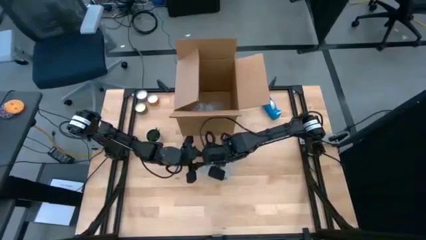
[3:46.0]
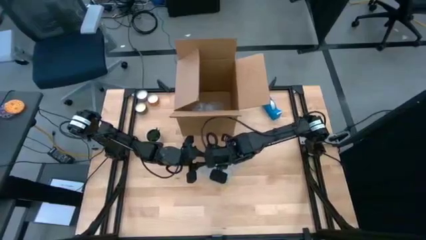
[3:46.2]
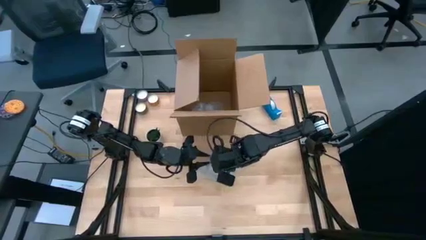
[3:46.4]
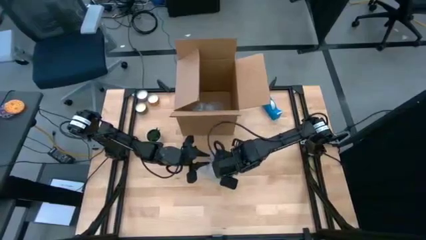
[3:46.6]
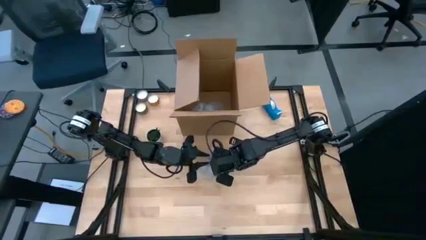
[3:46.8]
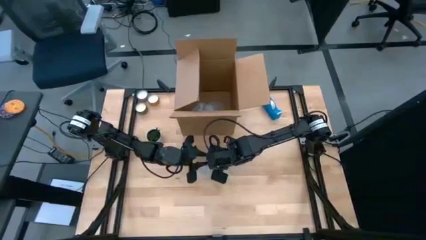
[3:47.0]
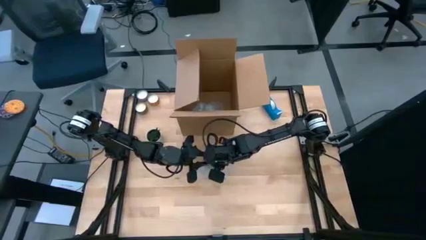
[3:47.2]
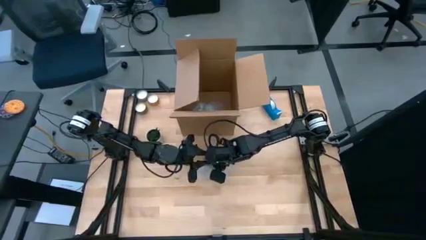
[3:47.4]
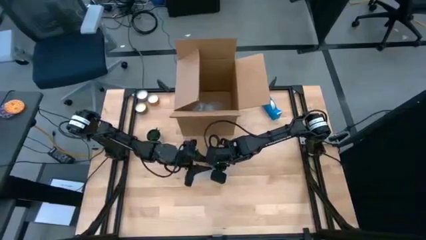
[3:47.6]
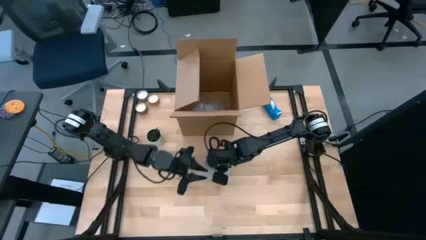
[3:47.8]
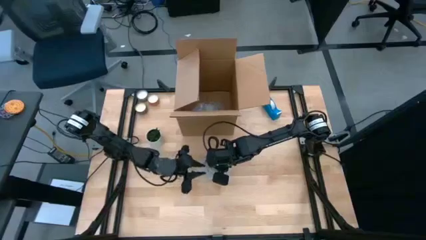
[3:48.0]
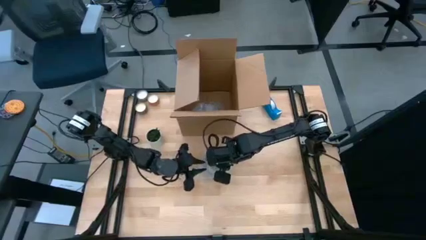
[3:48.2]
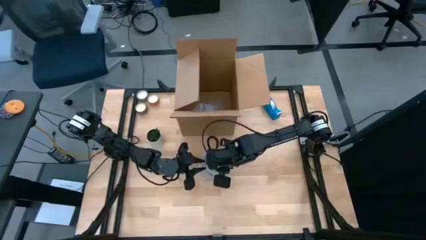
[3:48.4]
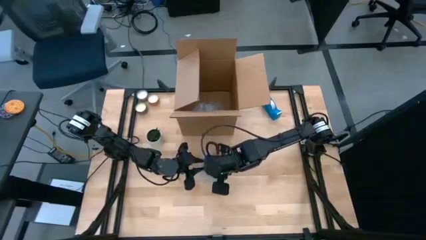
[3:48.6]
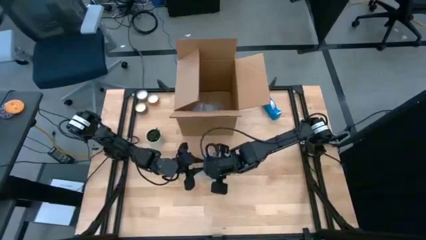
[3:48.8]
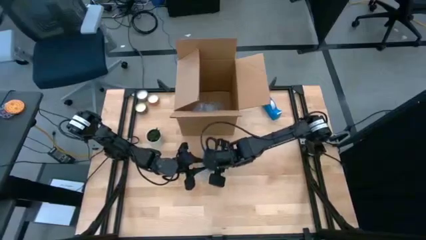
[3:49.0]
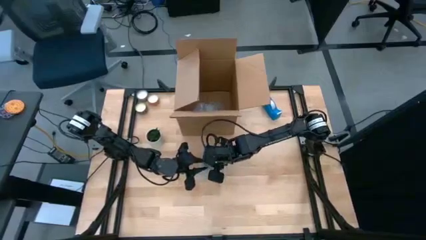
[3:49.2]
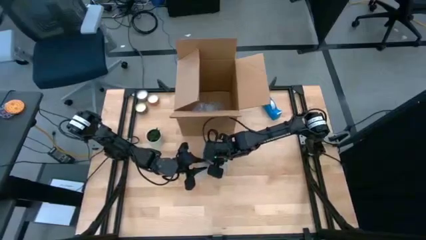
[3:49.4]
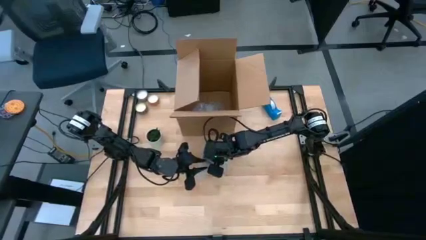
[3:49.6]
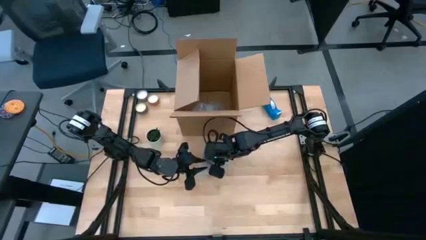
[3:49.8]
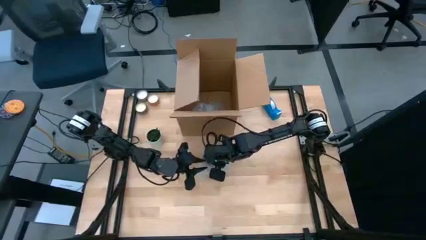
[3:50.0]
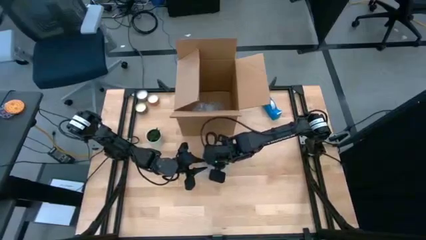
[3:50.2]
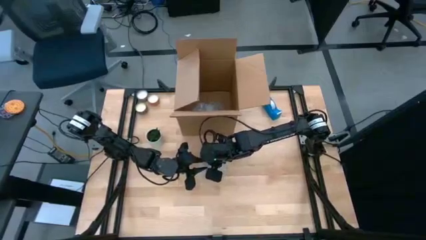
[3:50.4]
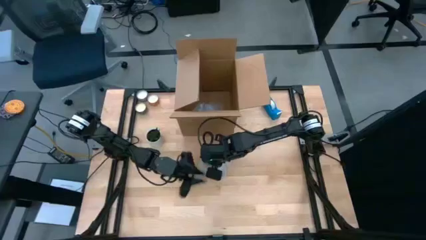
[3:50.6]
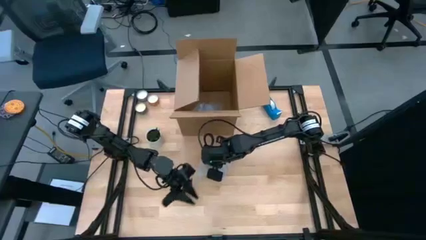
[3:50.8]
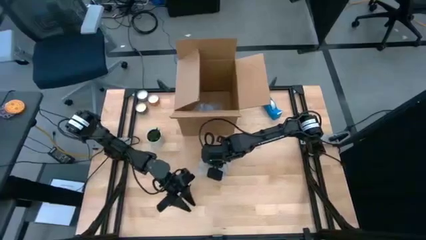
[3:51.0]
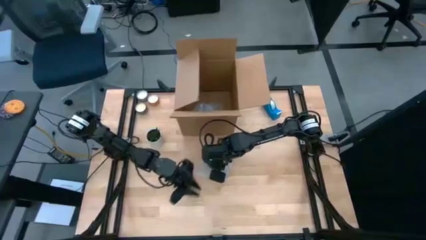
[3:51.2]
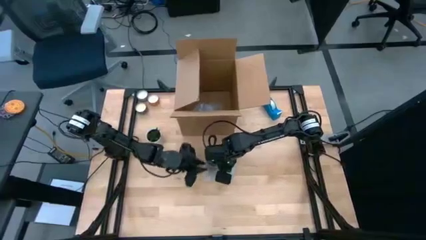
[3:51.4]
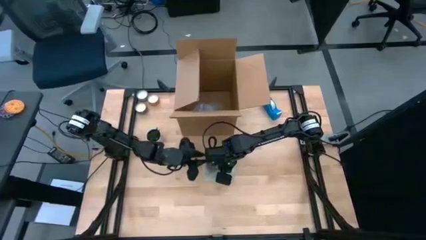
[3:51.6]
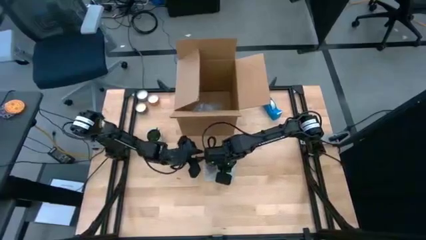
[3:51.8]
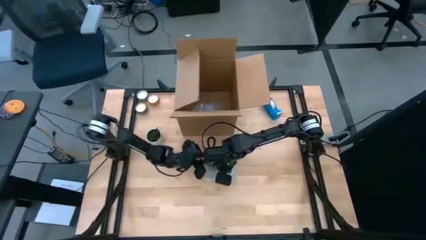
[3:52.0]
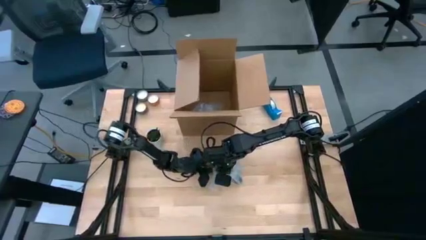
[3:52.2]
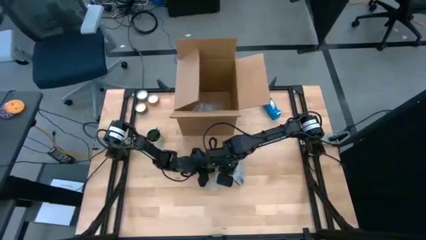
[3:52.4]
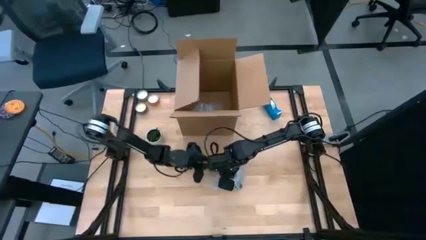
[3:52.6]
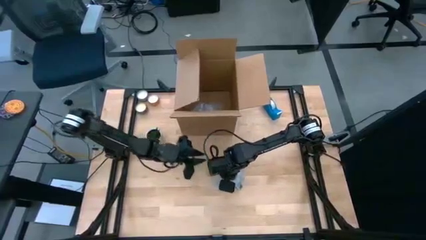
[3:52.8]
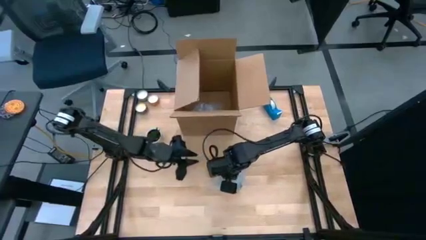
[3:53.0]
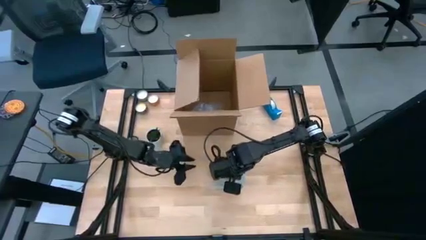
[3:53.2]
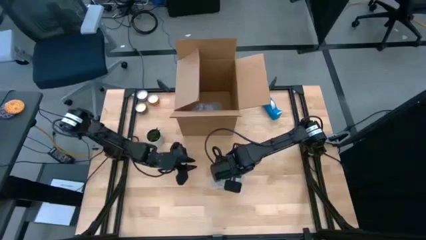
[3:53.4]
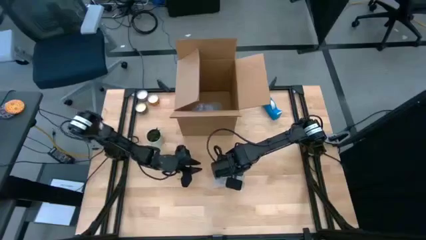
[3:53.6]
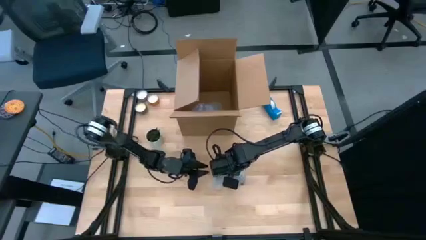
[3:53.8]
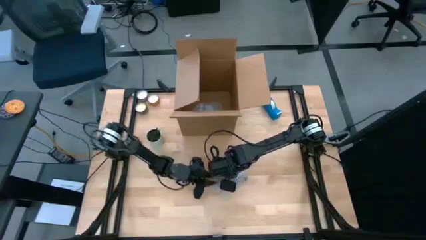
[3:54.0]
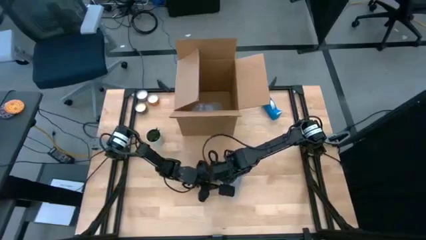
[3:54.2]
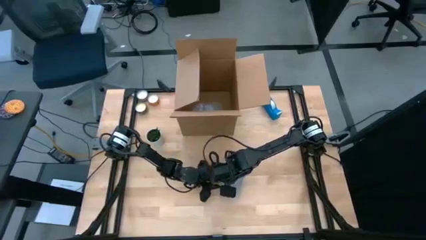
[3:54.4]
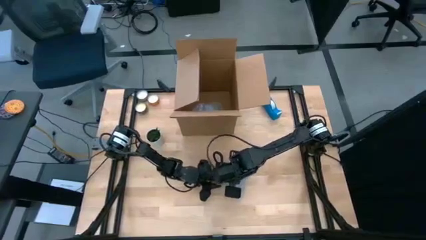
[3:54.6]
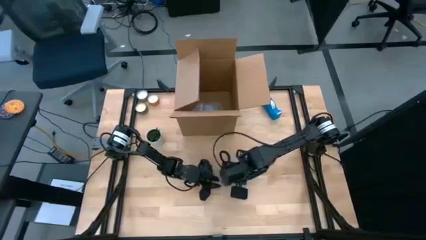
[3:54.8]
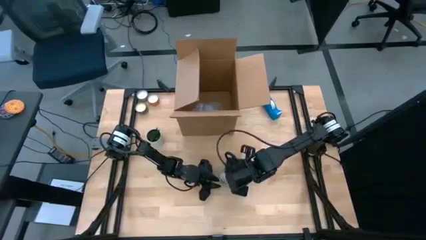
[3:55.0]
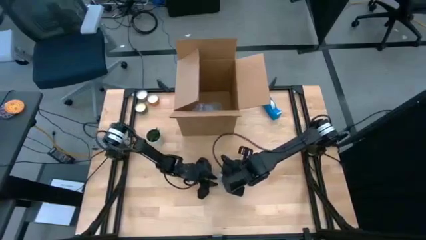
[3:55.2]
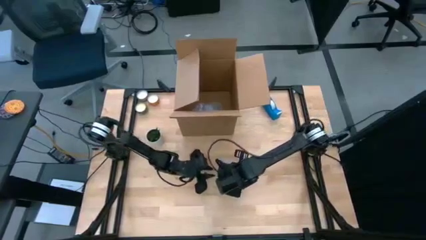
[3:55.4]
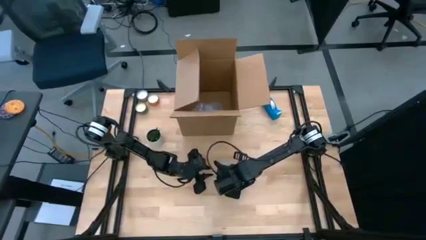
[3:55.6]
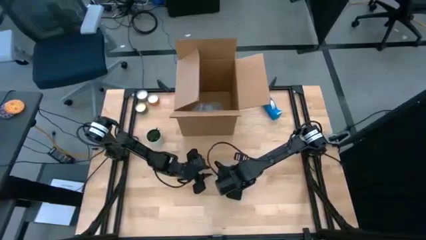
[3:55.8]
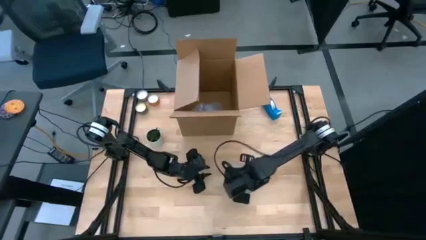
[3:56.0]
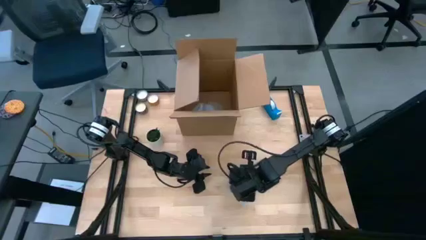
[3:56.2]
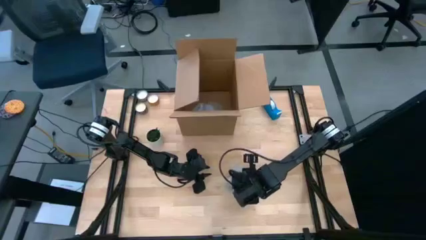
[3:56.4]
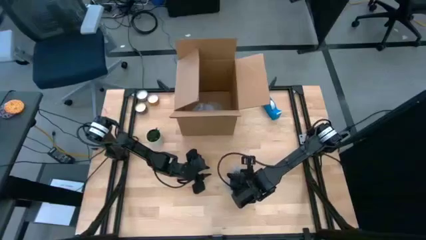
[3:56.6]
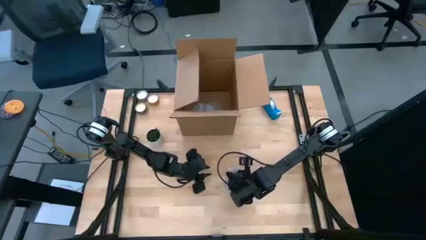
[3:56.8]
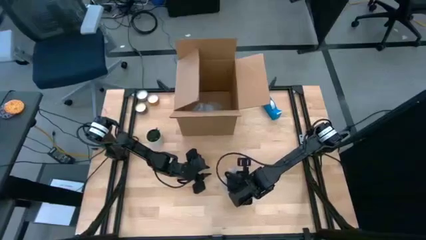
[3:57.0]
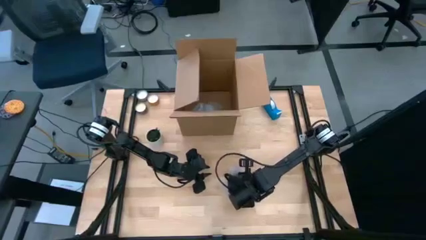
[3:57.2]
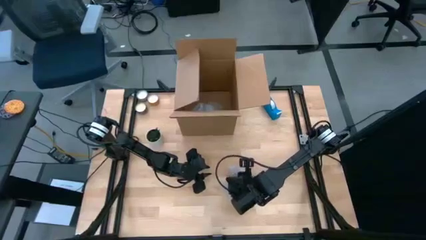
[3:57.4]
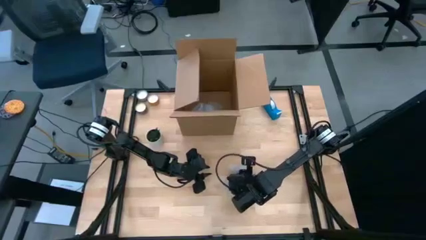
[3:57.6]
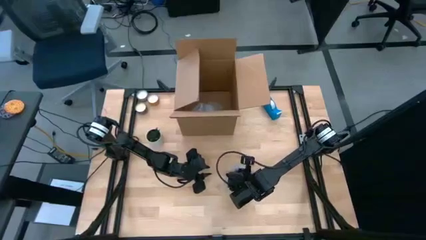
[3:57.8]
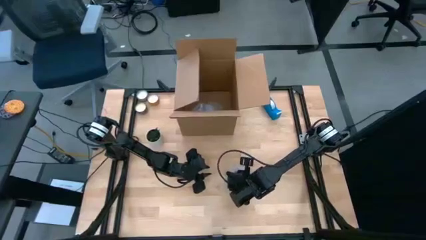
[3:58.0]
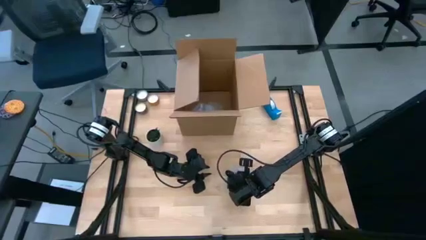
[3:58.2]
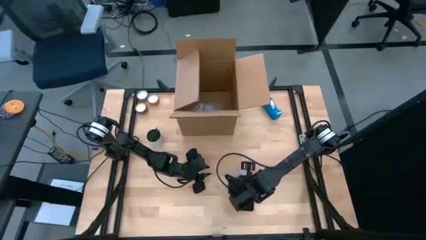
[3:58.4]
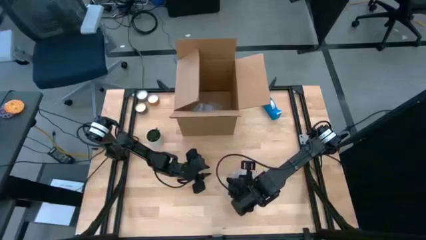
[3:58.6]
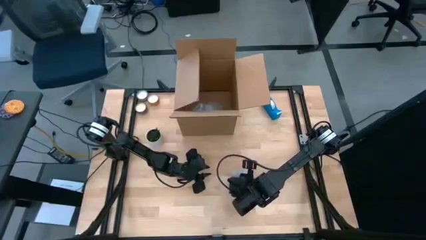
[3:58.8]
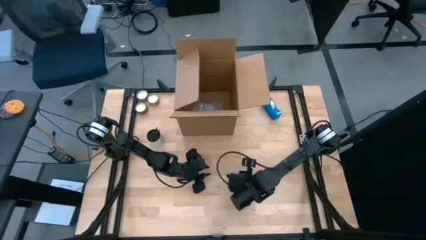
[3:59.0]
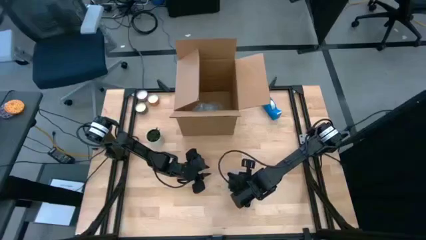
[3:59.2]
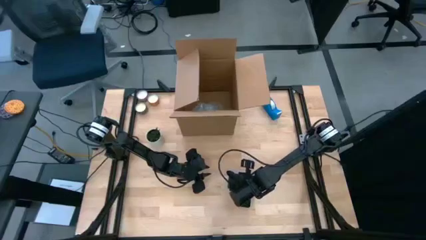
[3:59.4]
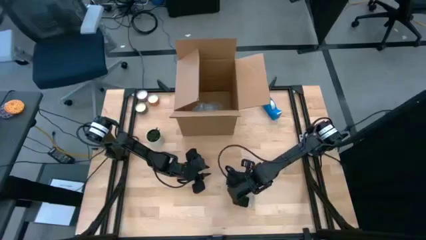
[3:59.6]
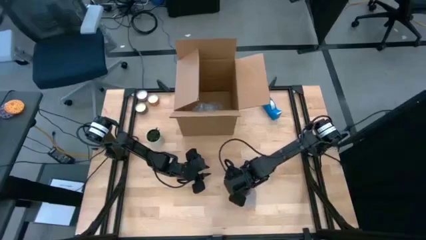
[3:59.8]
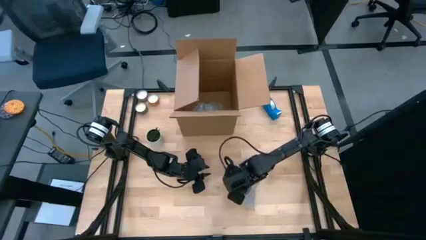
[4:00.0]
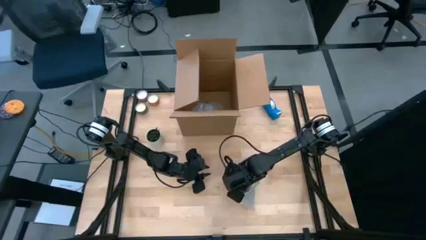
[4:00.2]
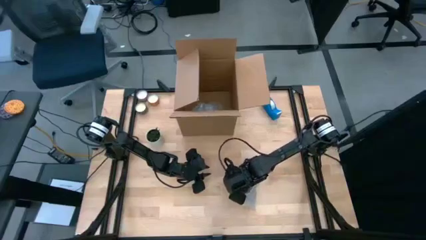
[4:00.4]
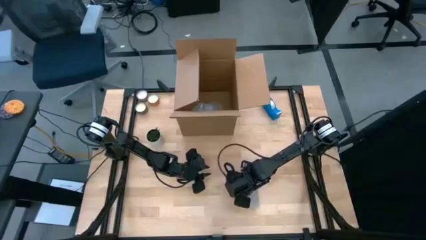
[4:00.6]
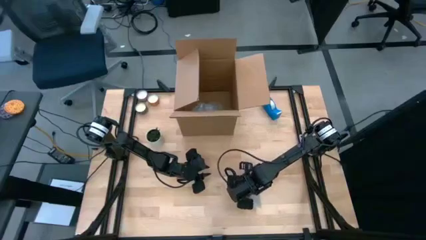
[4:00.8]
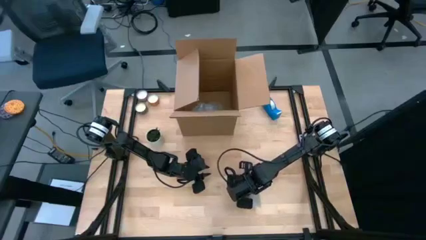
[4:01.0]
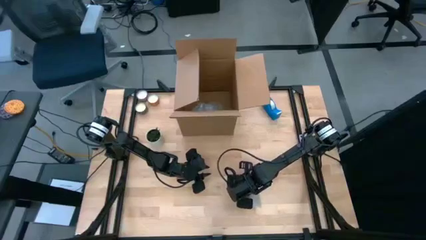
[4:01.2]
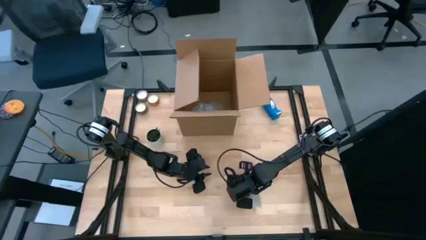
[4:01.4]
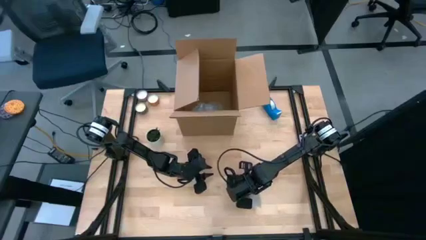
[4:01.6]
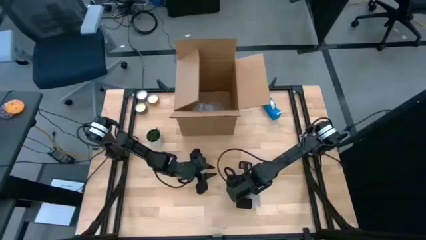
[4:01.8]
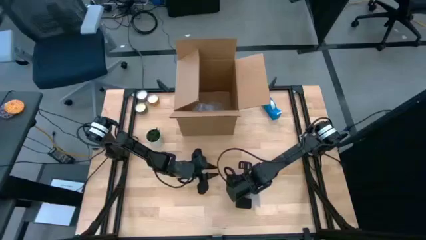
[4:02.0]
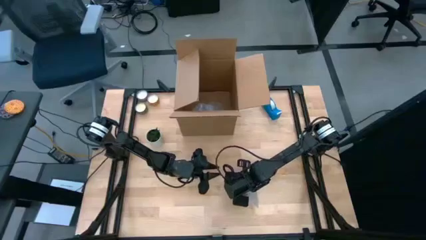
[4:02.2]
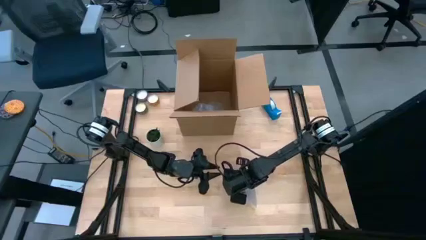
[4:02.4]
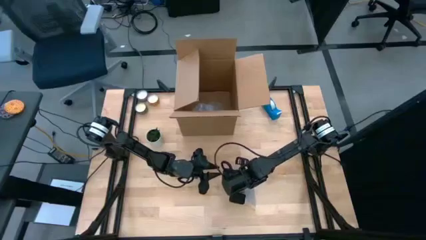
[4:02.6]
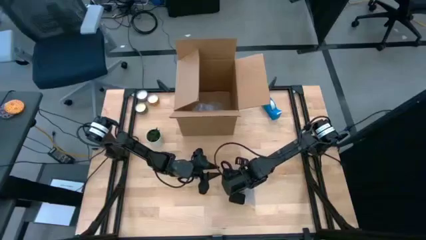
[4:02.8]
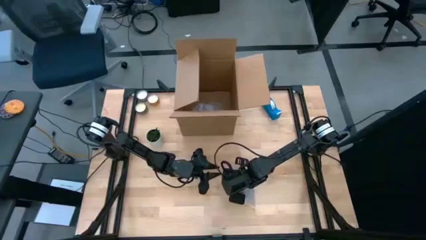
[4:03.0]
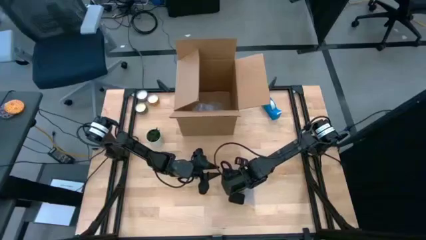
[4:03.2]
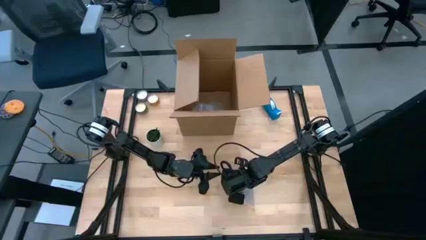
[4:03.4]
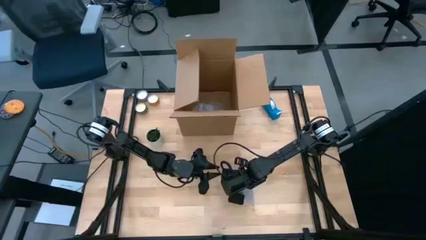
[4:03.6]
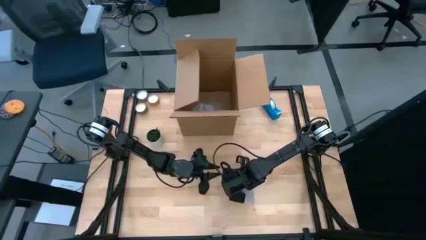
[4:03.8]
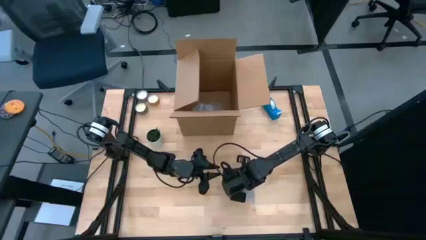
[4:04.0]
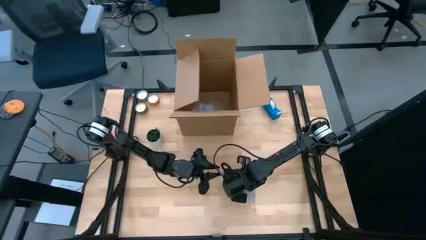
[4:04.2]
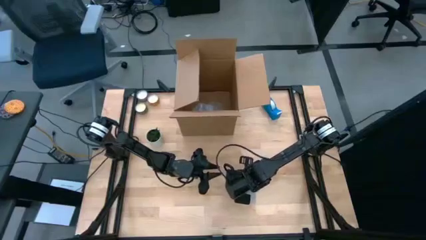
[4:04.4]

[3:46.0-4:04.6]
Task: wrap mug
Wrap the black cup with the transparent bubble wrap
